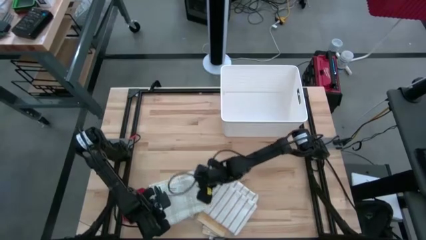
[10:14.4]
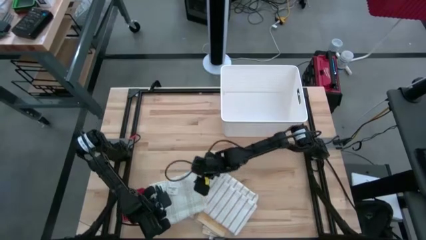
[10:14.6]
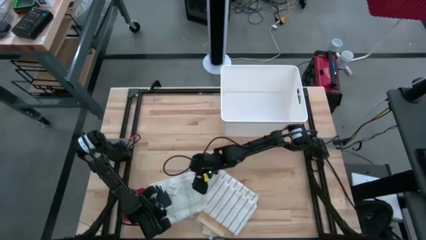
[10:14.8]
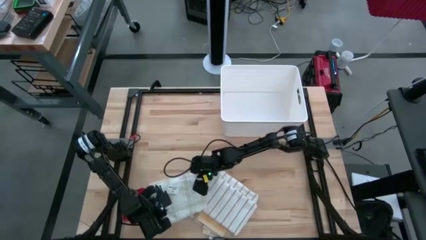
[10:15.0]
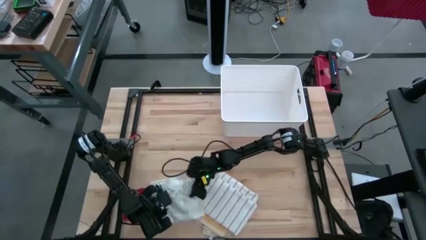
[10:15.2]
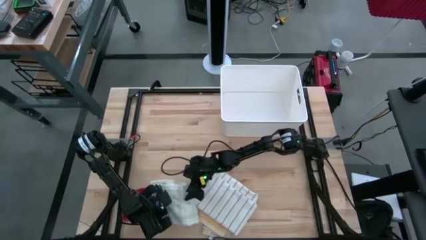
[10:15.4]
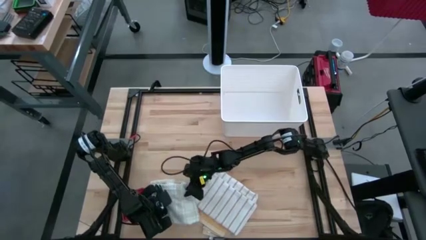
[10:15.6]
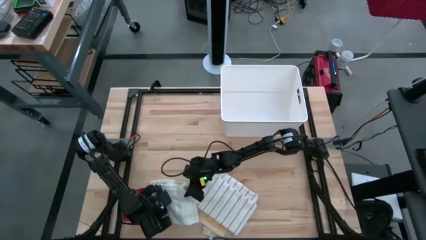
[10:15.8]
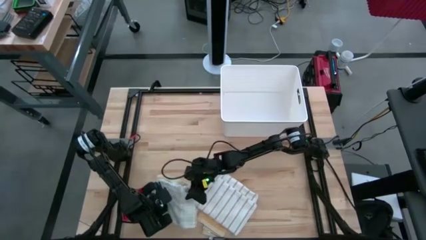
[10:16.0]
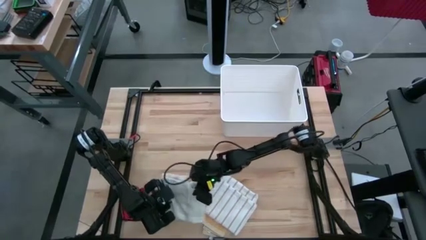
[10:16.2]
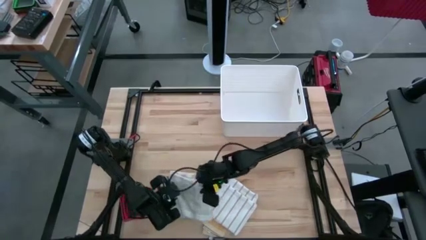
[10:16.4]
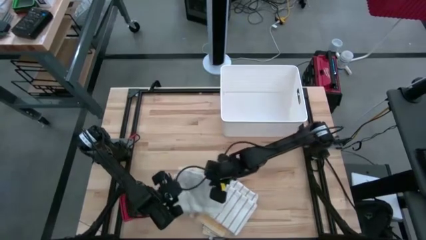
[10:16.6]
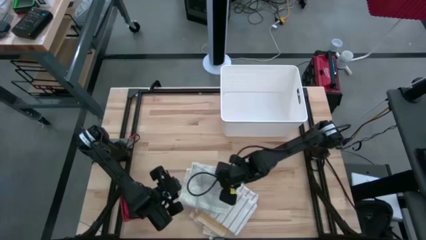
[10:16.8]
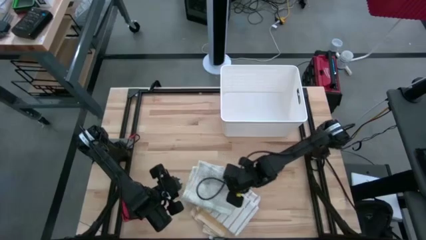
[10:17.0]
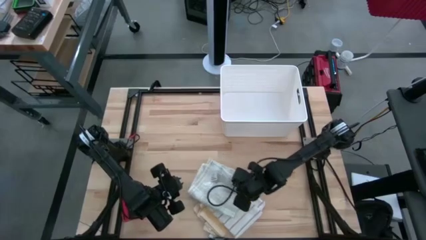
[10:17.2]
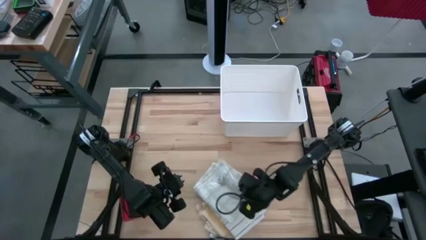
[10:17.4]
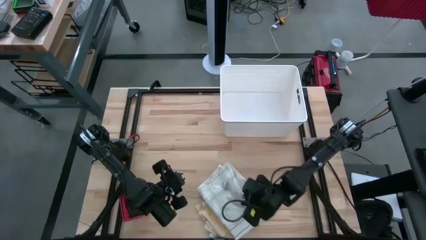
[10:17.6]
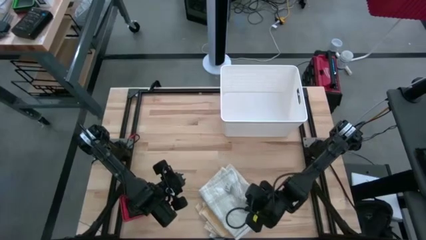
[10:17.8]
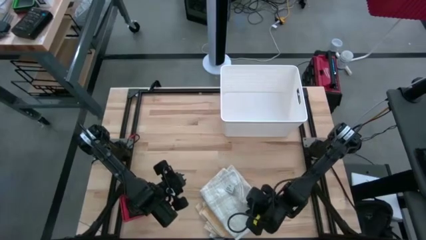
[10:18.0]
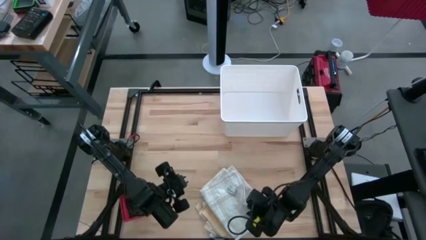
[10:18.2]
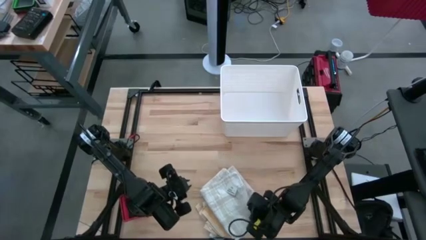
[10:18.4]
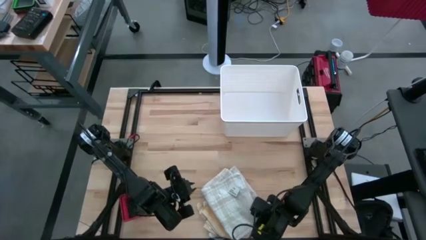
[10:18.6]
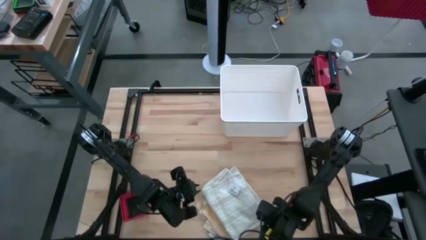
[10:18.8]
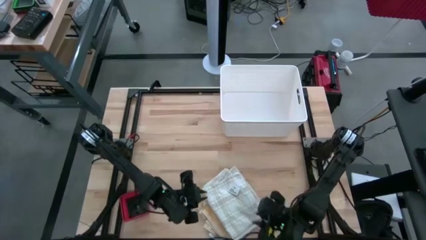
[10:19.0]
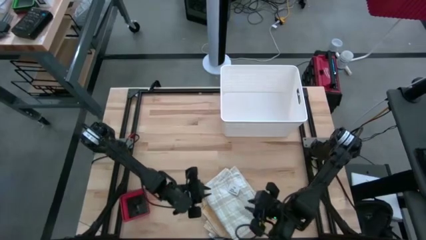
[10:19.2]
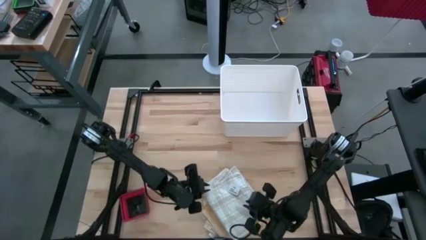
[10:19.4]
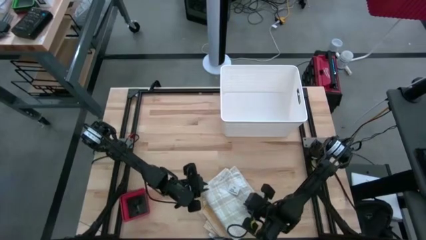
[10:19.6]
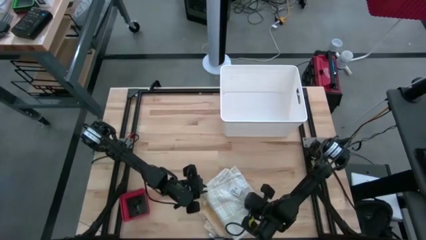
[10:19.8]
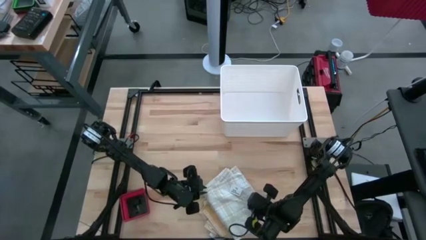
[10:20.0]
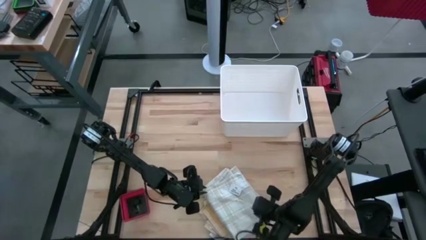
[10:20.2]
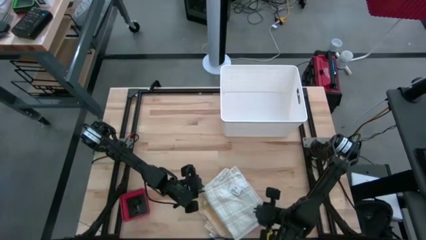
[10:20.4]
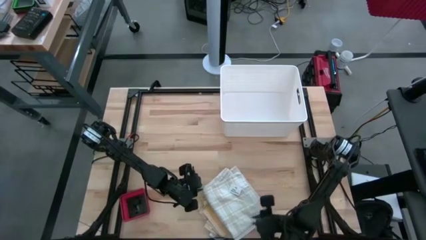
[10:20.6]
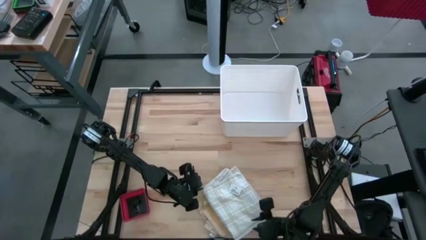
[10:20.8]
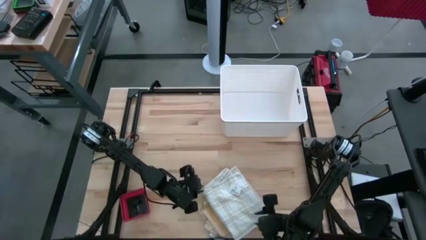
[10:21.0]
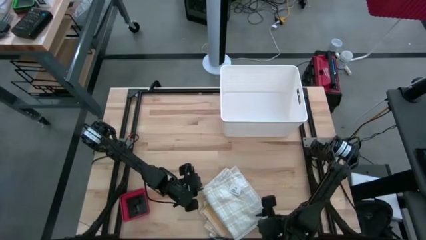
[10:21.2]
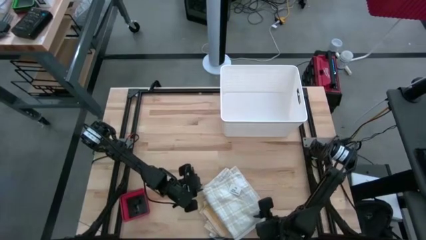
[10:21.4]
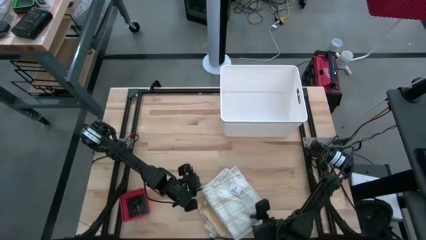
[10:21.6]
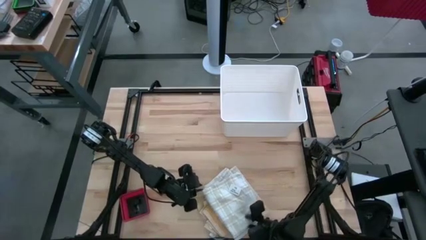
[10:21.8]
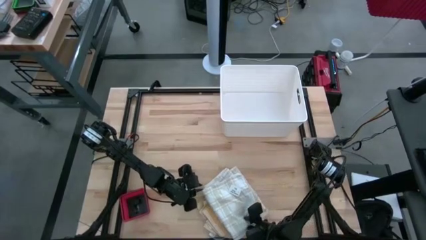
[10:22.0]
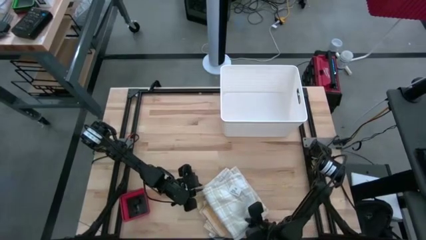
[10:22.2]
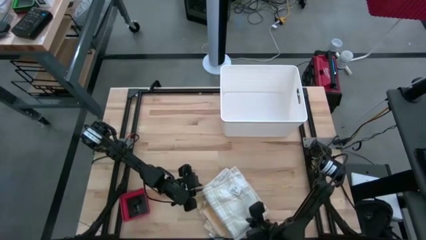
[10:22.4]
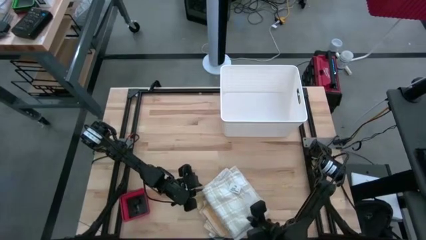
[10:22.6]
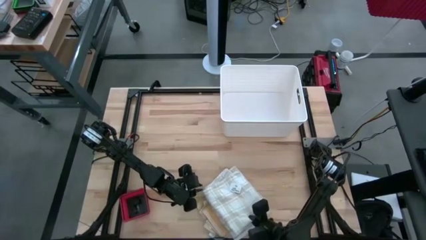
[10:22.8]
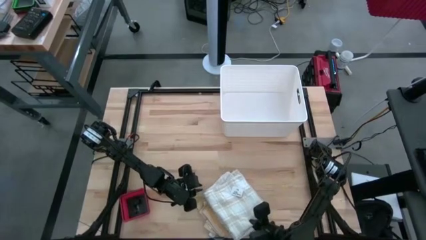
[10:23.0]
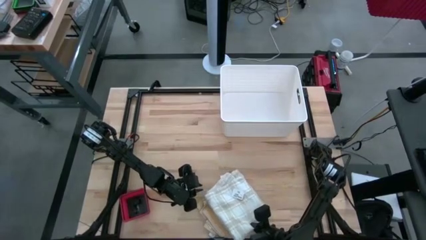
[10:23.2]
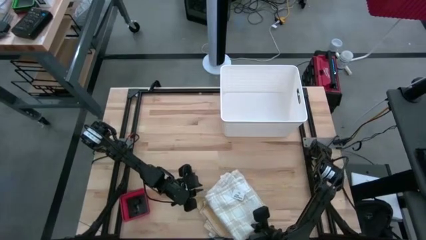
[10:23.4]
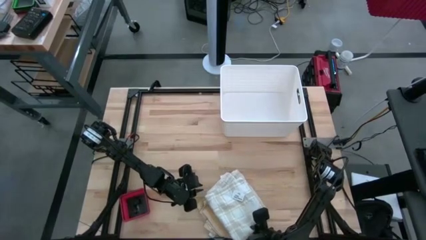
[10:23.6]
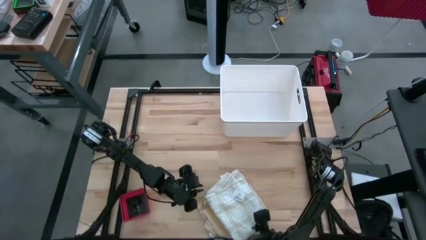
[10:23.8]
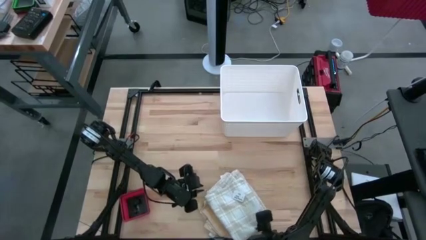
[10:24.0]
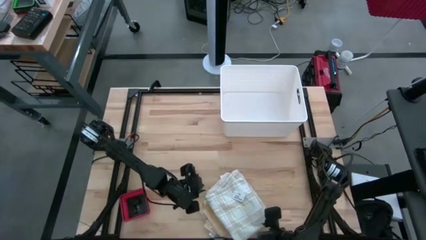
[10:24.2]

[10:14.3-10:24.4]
Task: Fold towel
Stack the light brown kitchen towel on top of the yellow kitchen towel

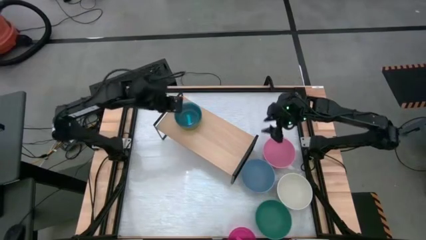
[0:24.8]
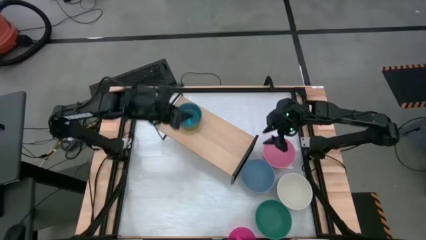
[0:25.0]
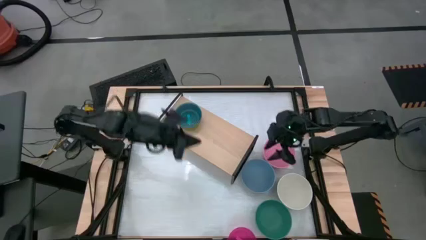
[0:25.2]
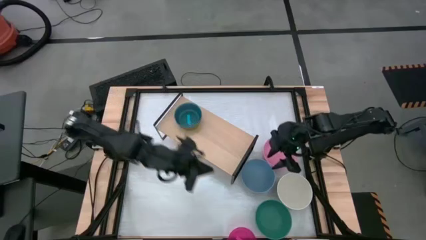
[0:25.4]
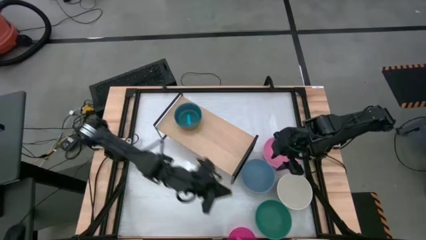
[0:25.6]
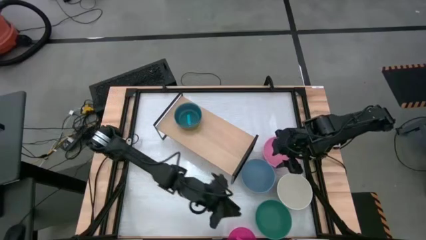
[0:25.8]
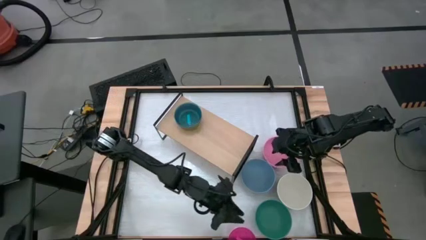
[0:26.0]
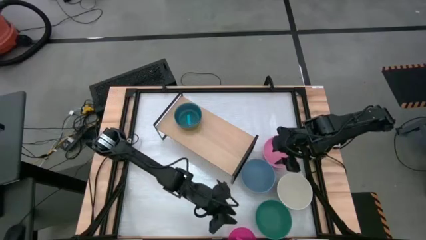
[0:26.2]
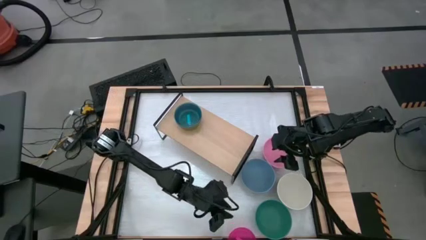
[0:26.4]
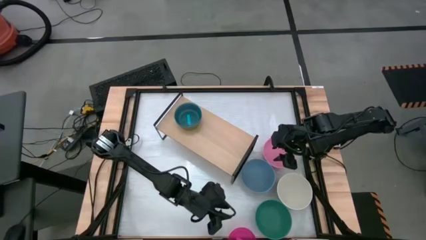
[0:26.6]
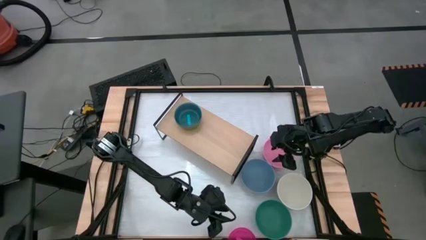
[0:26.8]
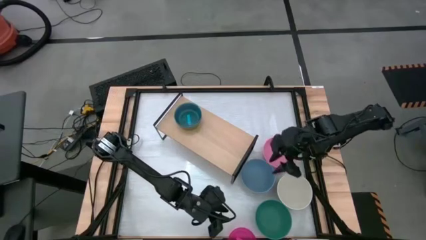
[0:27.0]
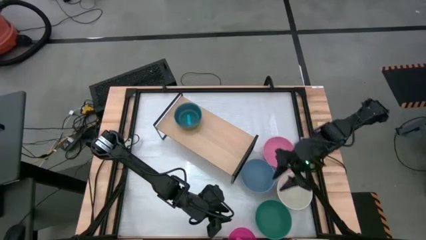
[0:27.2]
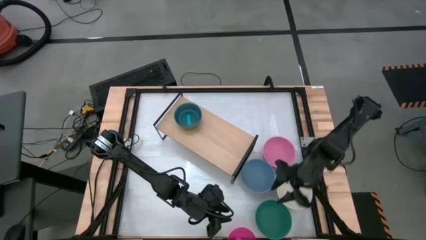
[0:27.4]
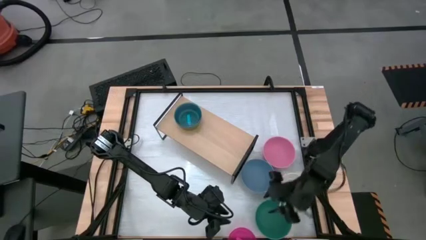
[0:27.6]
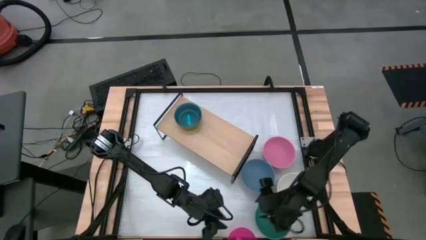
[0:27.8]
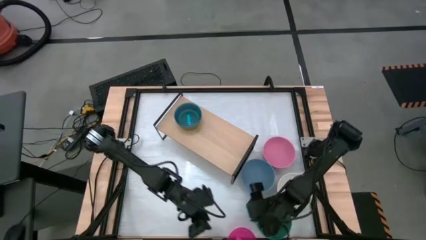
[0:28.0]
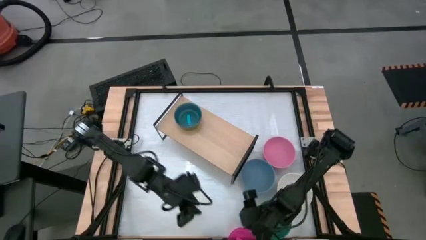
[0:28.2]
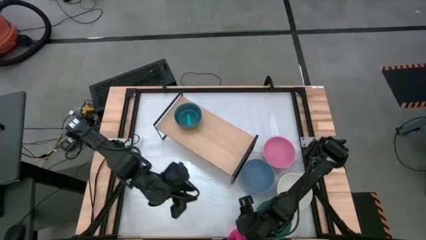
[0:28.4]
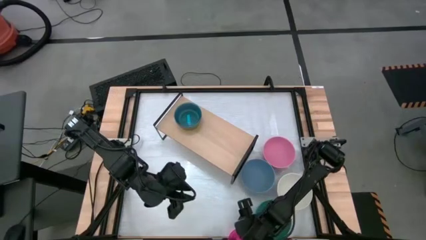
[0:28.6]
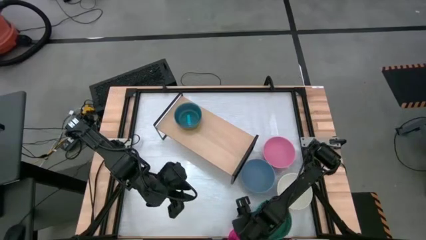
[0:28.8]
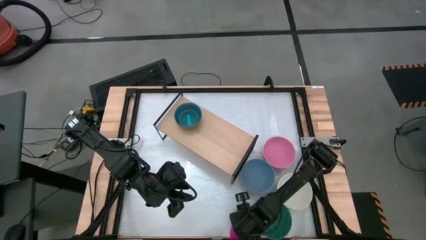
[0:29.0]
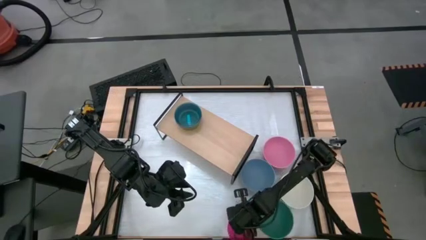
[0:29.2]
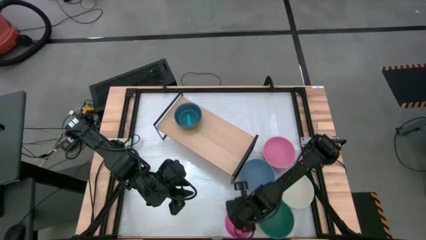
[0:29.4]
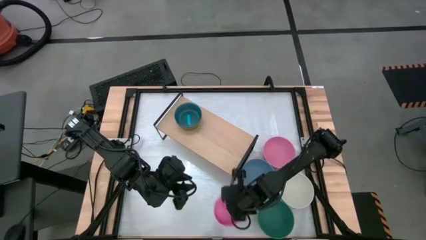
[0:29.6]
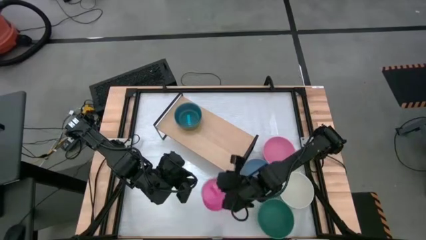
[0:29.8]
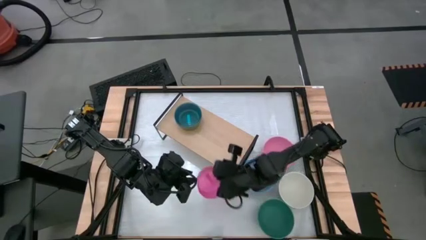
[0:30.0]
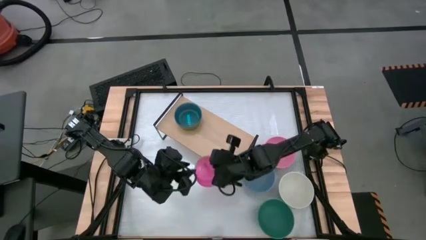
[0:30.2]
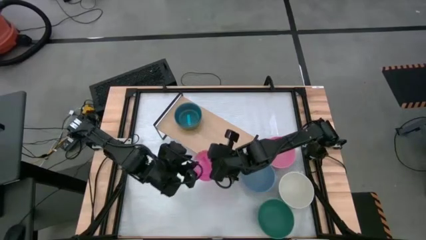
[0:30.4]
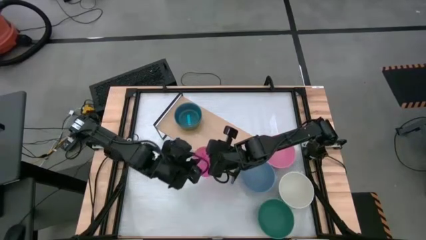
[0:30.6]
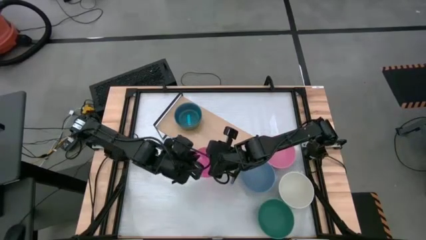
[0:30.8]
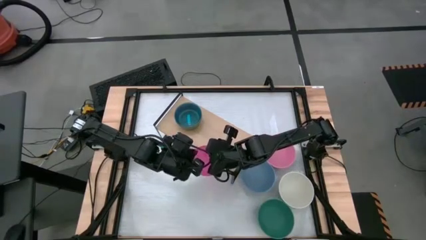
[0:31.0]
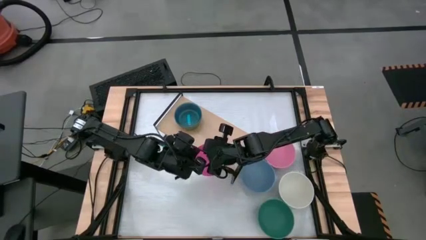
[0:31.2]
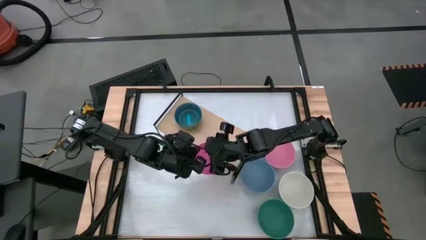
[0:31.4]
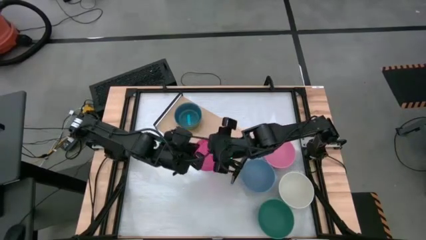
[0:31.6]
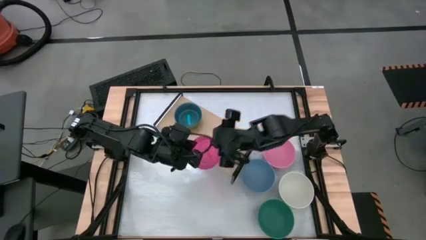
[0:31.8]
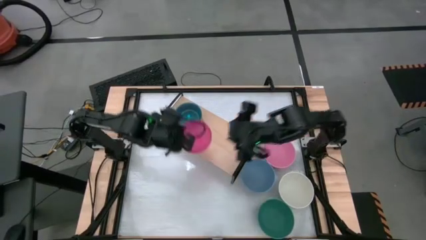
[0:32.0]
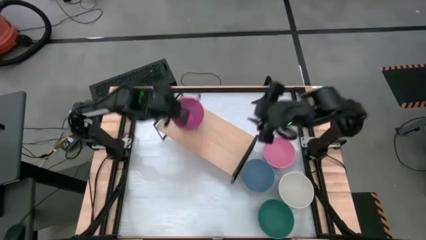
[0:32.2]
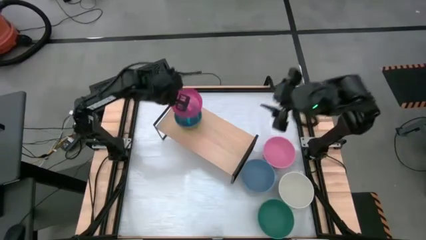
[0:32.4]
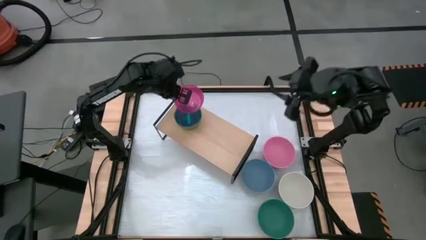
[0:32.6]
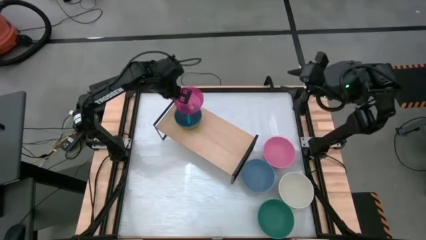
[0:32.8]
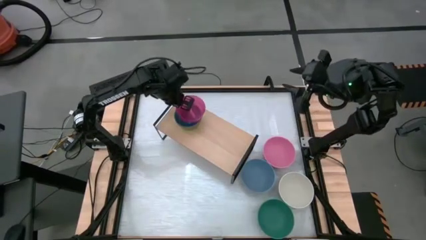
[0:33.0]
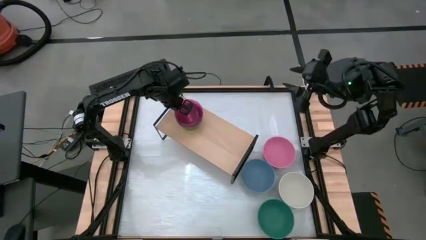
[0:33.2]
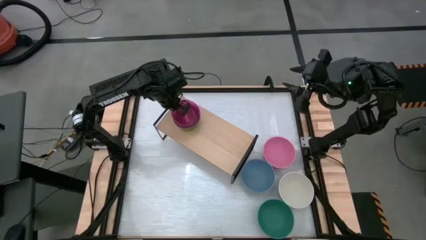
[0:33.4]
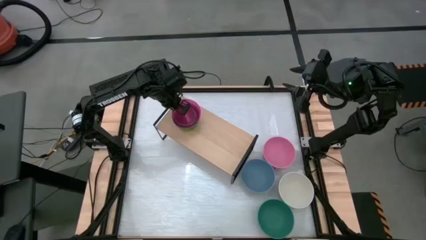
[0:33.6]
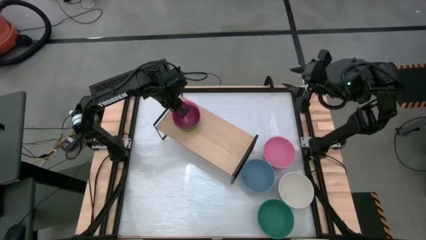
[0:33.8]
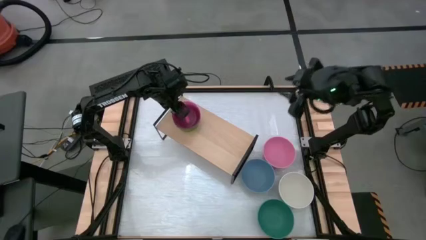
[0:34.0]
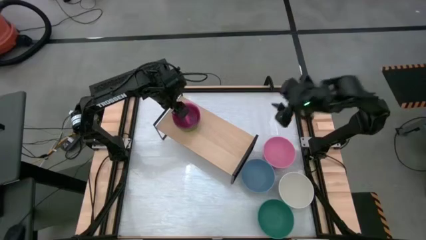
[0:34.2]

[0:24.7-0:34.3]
Task: Place and stack bowls onto a shelf
Stack the light pink bowl on the top of the light blue bowl on the shelf
